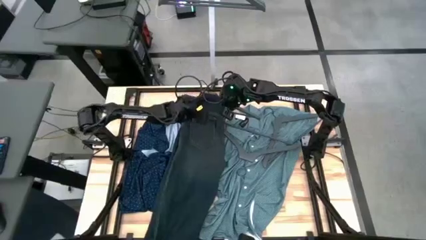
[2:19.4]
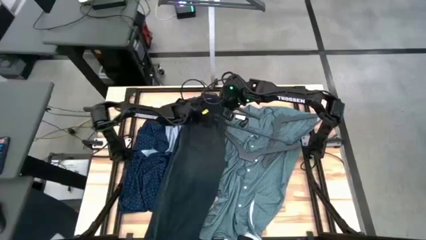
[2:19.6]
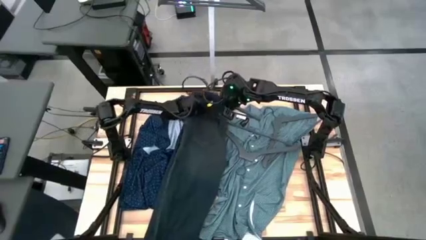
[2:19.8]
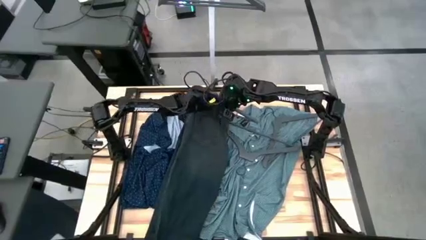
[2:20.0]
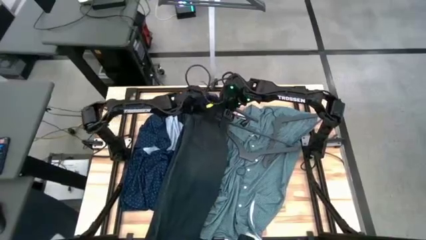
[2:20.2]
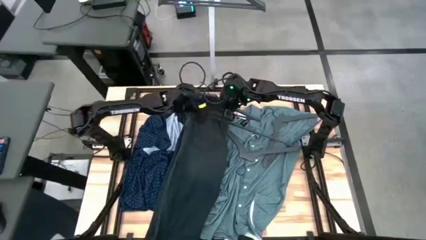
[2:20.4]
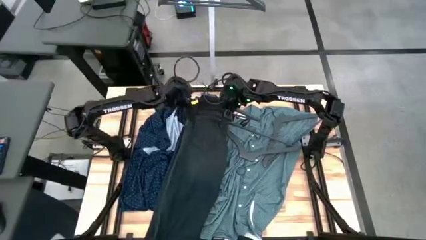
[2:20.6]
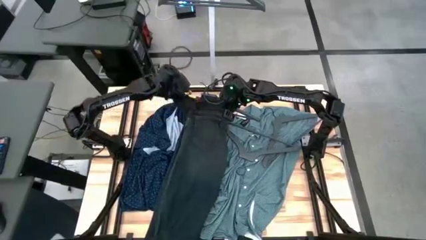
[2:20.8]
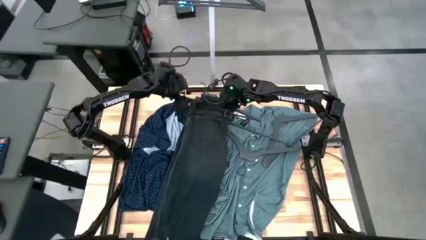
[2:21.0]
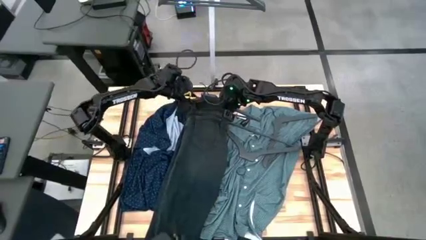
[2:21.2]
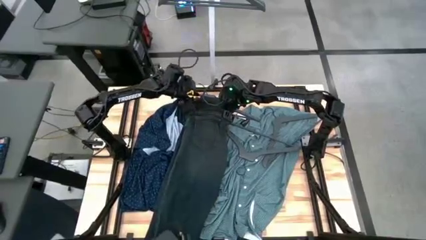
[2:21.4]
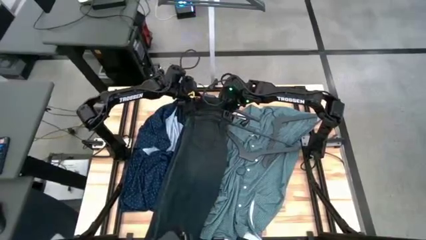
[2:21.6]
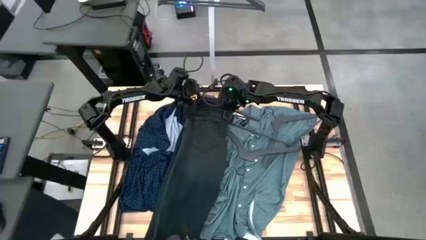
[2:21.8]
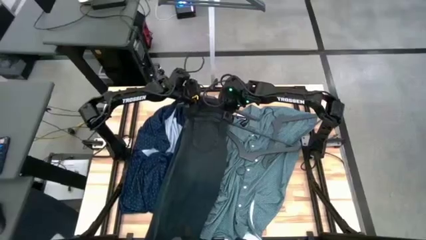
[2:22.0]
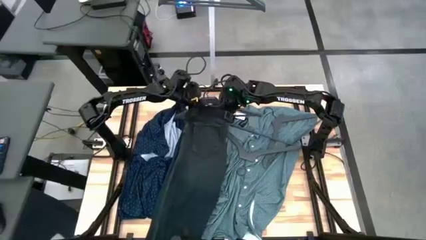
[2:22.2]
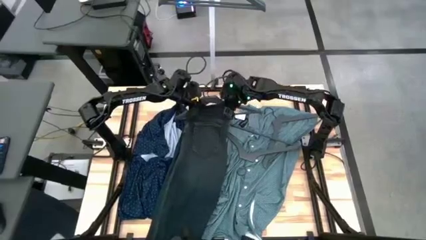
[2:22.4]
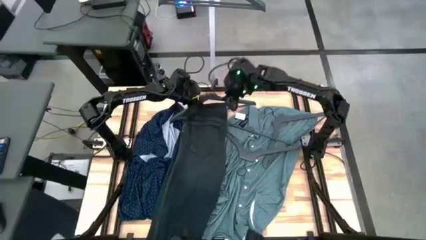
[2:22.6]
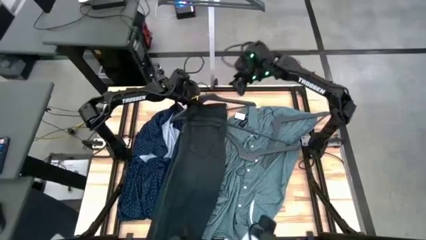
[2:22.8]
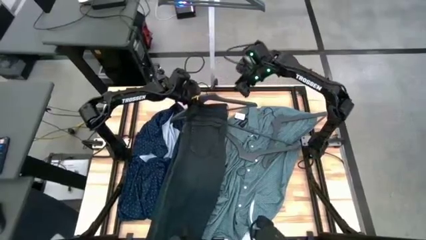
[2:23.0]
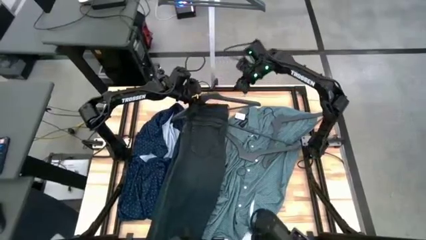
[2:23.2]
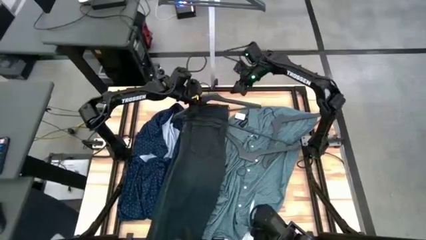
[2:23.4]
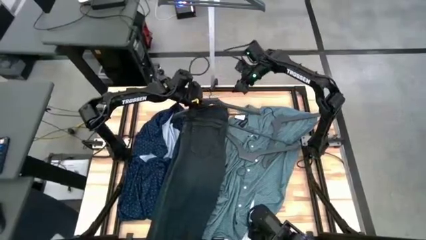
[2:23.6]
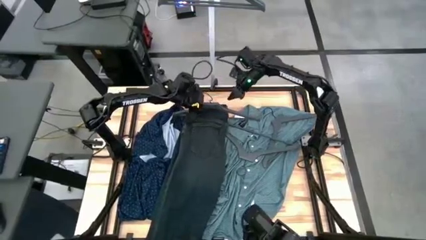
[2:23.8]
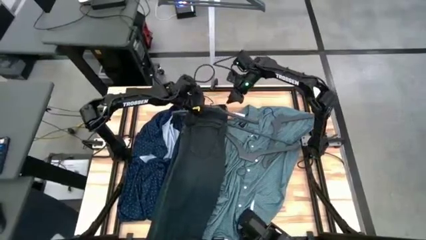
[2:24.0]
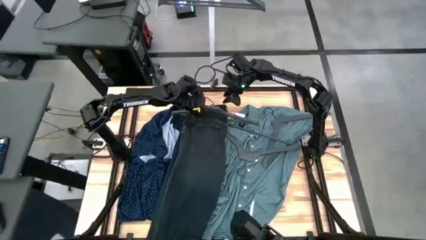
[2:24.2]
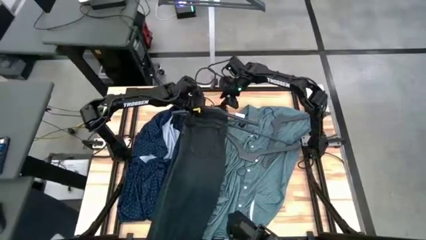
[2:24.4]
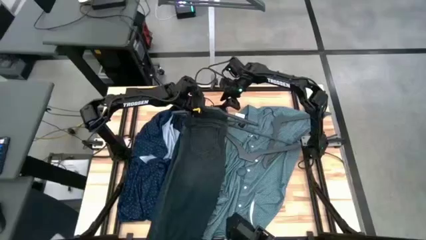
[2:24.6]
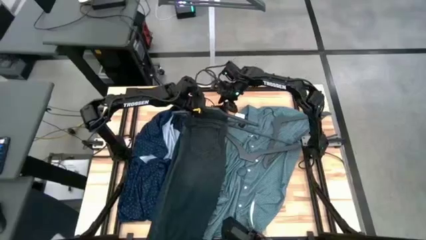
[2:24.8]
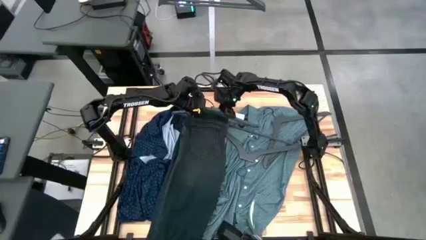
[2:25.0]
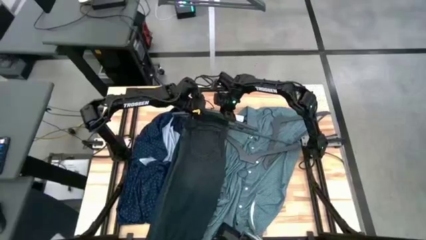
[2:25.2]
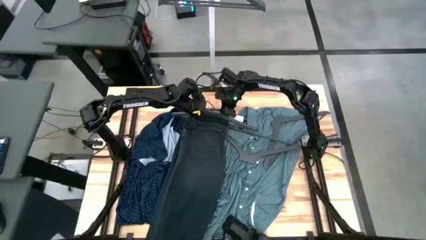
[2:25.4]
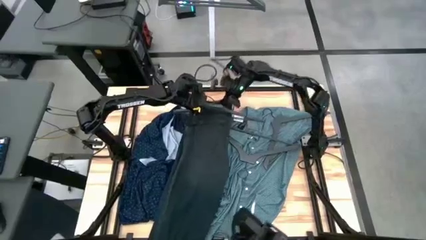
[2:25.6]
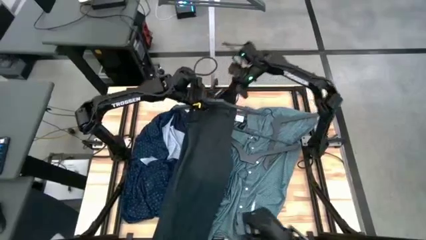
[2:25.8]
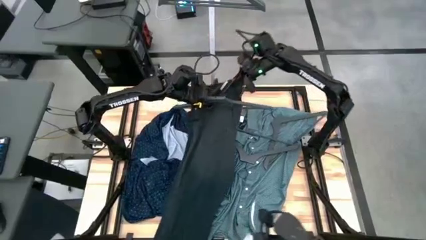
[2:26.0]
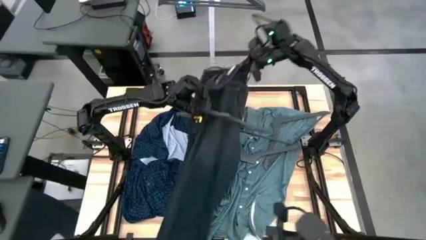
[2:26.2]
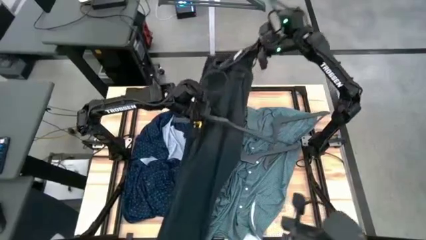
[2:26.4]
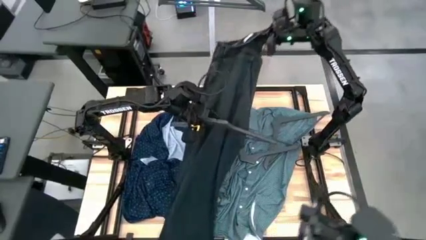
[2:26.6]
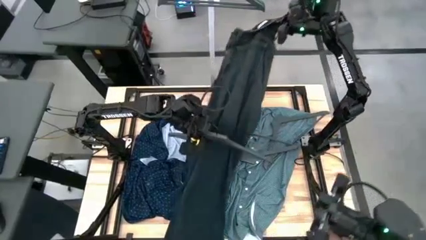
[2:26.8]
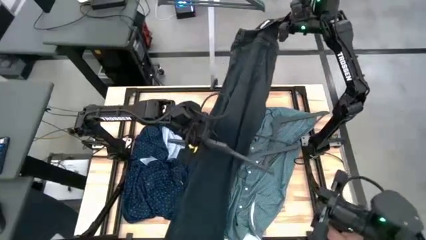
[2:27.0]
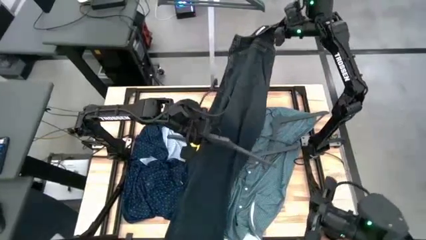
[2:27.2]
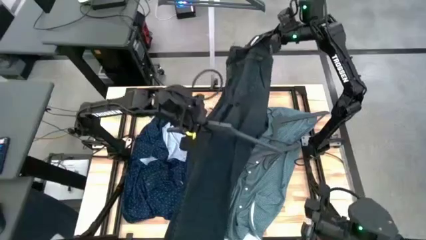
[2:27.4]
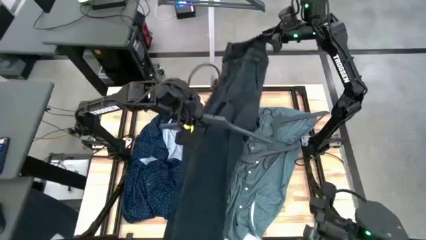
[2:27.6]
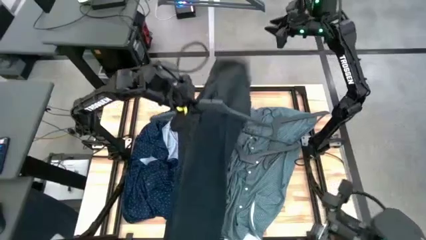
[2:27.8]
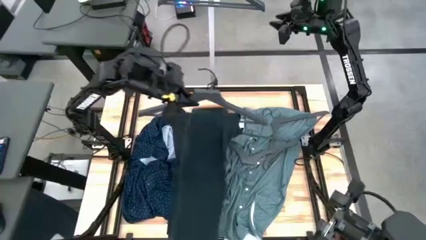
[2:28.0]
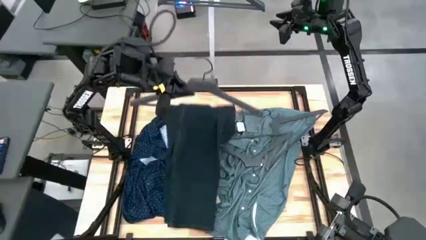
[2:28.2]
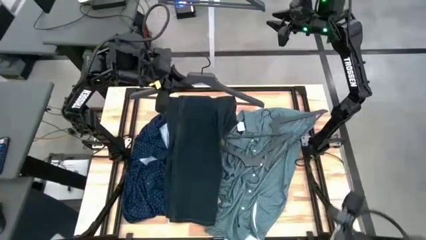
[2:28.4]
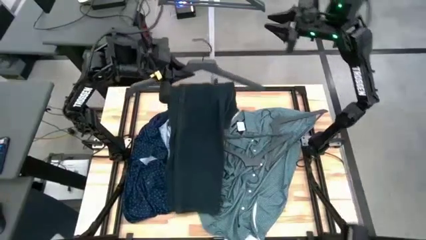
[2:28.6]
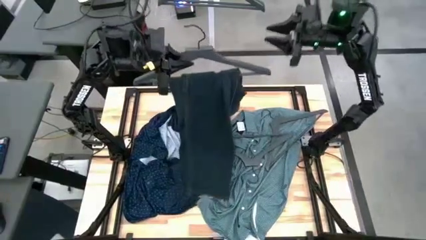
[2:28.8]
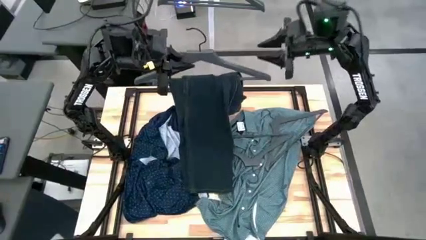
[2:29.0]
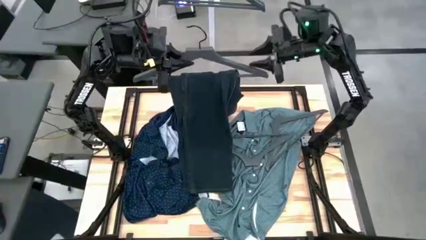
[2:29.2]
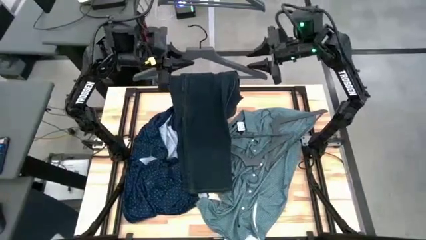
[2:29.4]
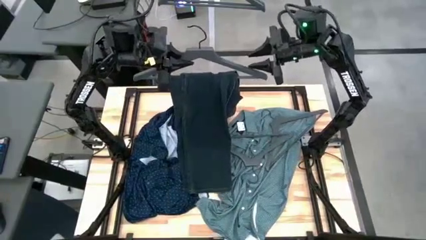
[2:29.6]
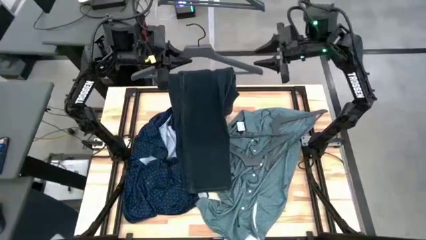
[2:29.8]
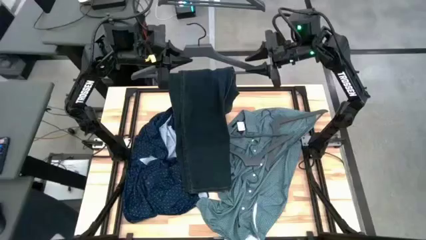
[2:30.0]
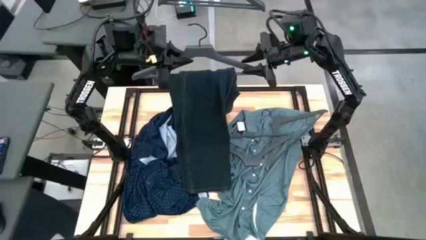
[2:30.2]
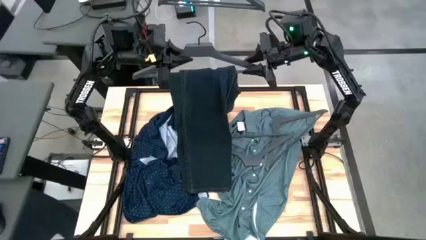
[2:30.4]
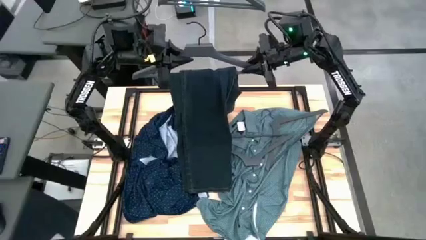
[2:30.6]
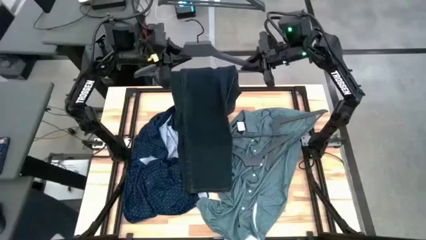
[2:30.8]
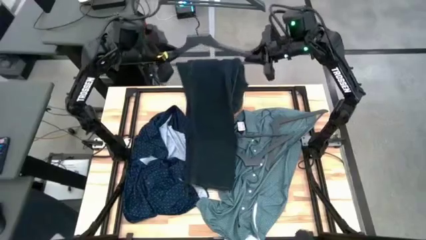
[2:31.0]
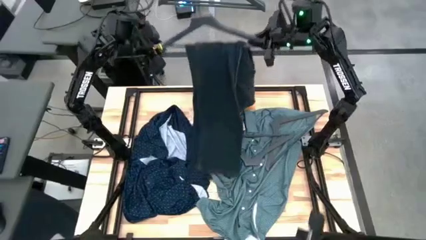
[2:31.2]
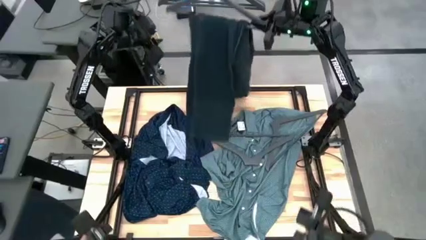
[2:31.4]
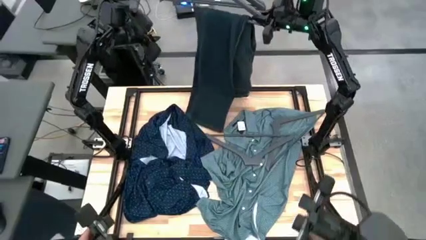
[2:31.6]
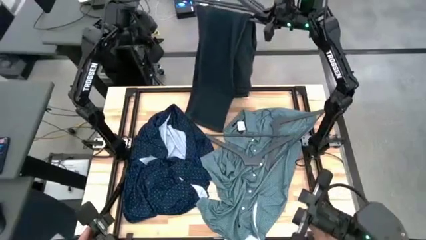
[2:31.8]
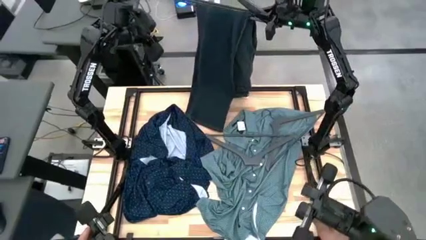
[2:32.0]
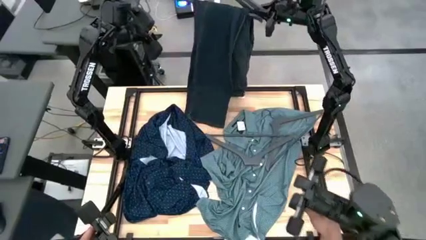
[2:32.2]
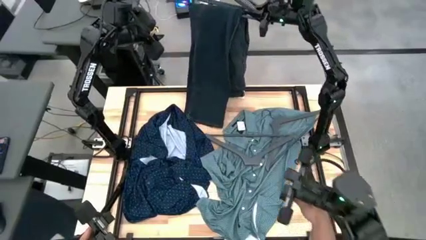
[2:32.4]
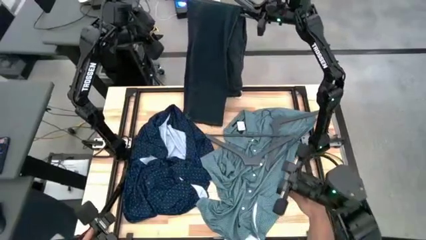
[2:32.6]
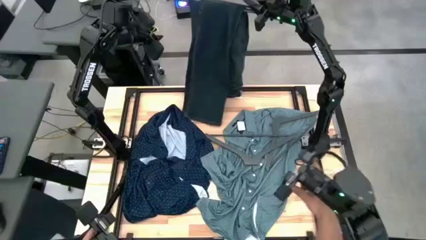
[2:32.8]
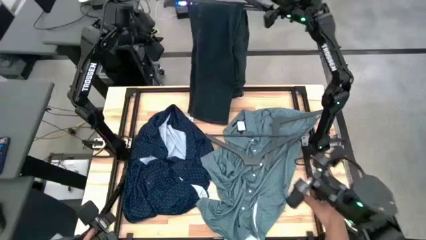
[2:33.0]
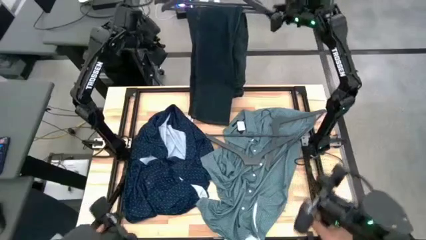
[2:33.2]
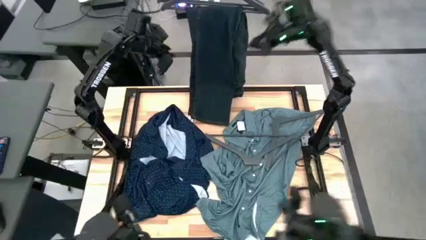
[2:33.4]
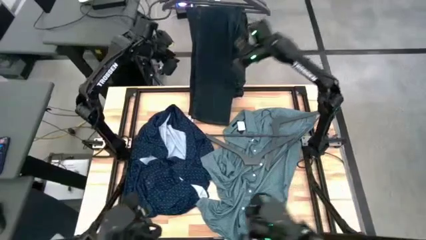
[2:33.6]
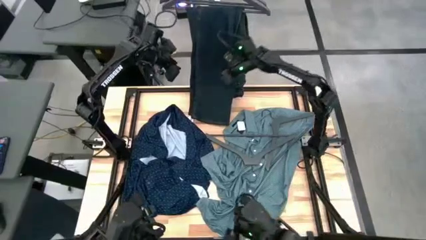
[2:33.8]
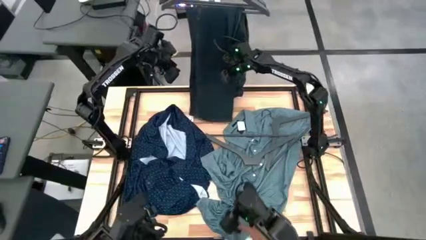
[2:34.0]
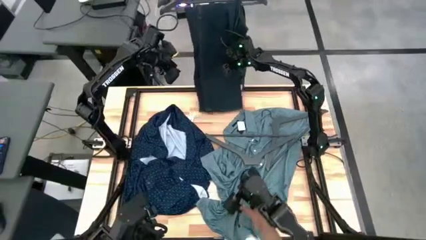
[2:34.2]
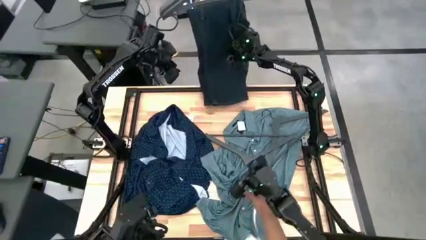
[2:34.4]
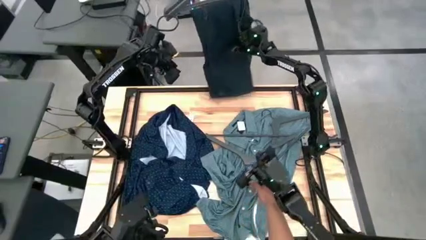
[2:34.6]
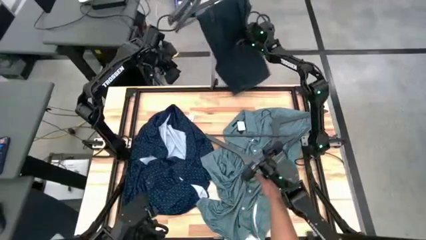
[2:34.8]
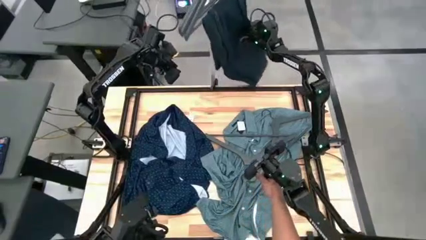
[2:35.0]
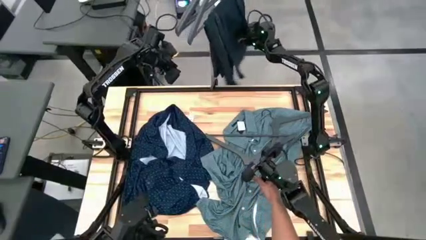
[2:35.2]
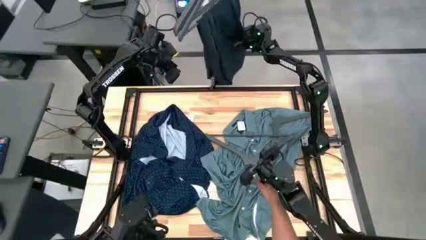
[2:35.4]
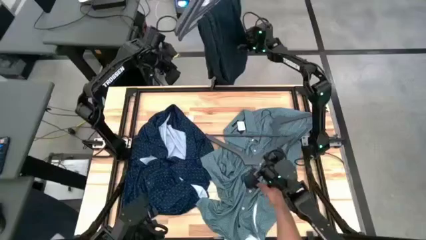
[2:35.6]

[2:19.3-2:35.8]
Task: Hang clothes
Hang the black pants on the rack
